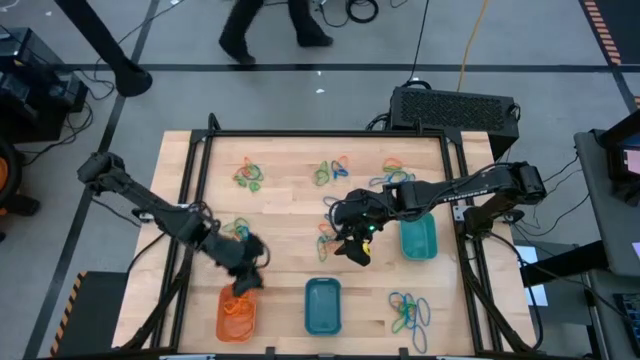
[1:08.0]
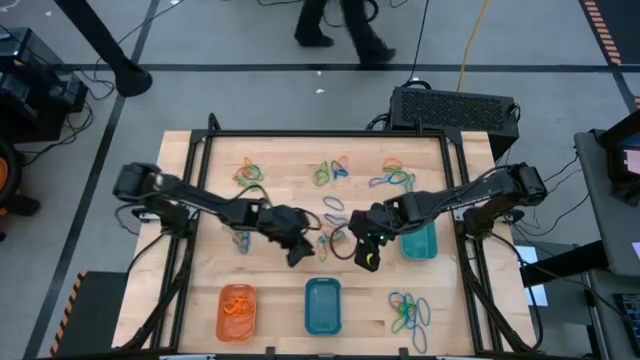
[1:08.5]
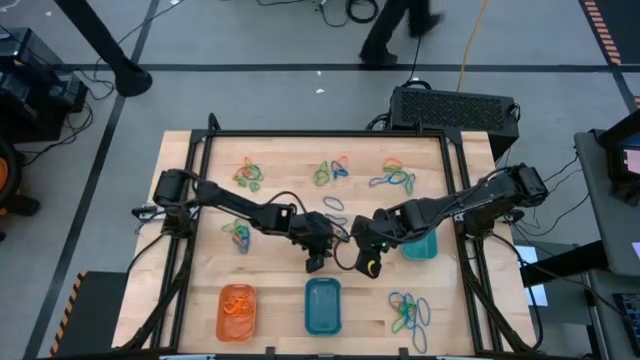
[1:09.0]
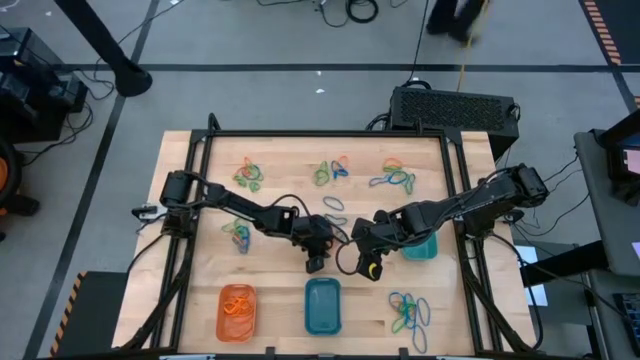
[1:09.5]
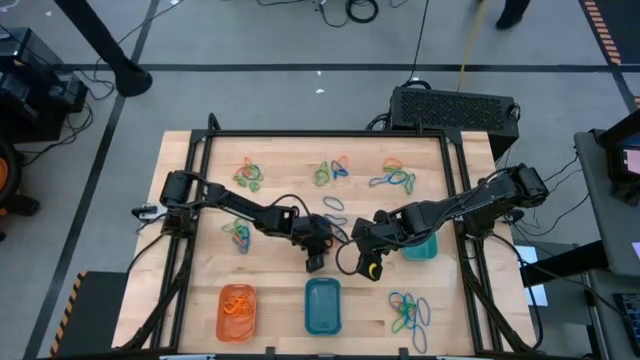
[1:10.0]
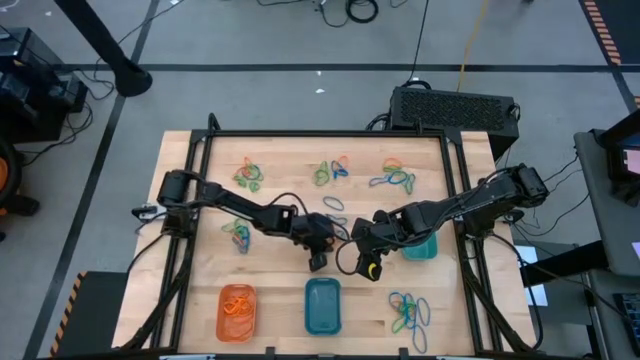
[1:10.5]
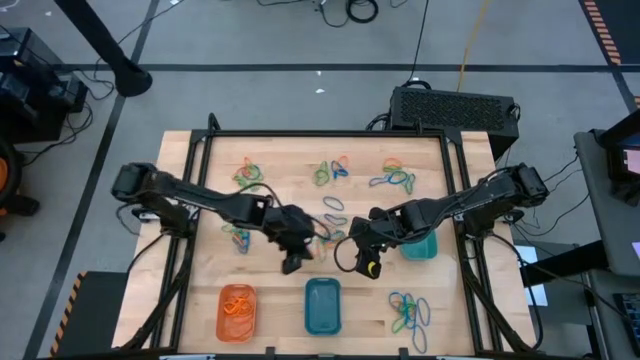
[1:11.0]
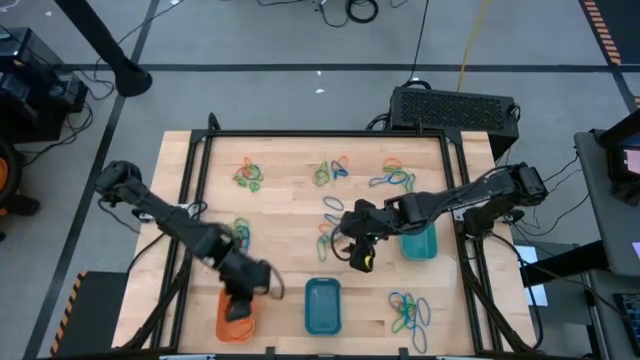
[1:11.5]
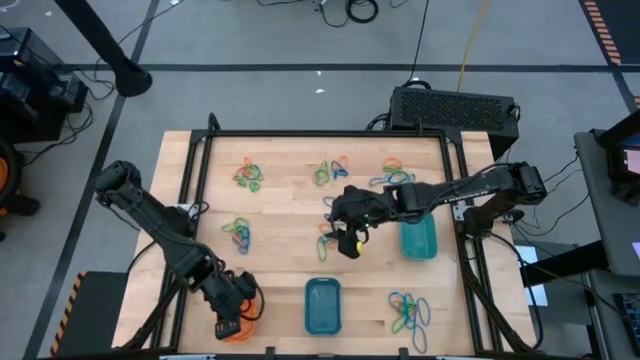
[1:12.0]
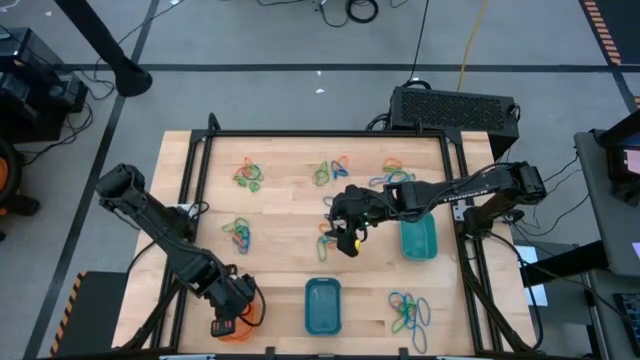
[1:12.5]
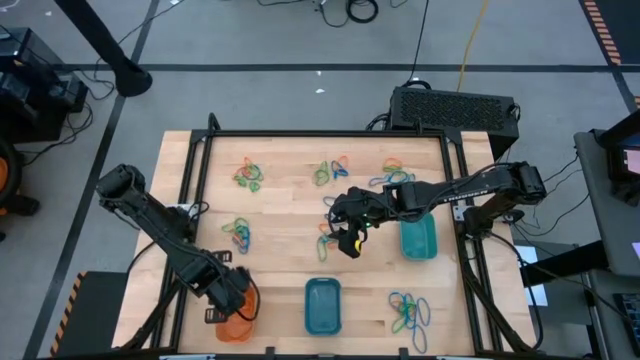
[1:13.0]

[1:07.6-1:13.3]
Task: Sort rubber bands into baskets
Put the orange rubber band into the orange bin

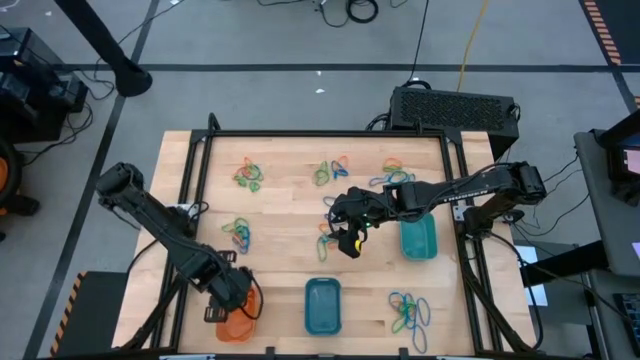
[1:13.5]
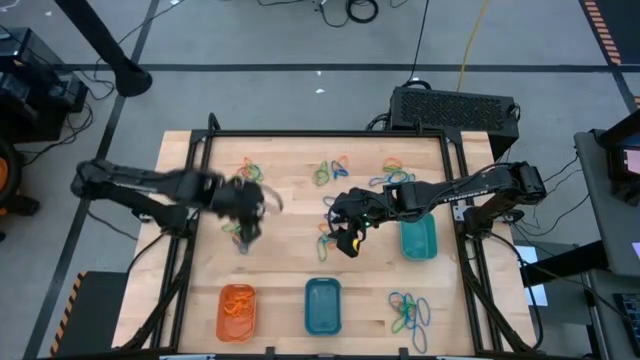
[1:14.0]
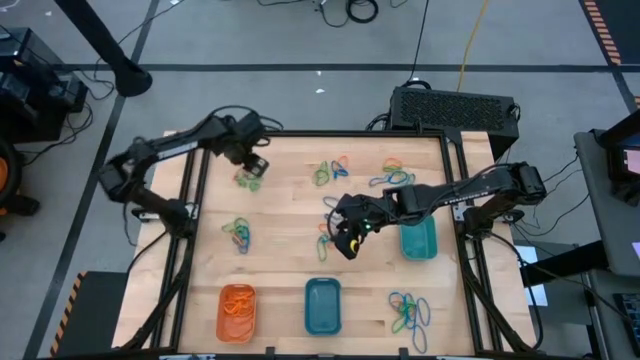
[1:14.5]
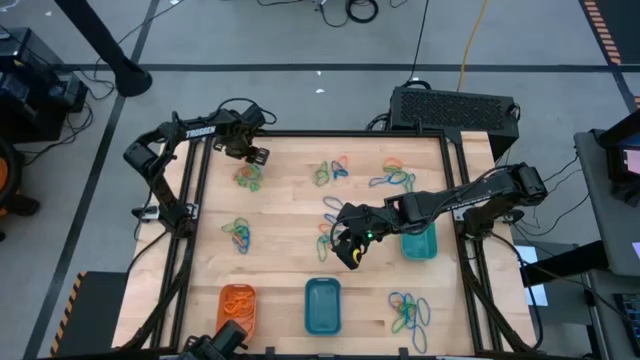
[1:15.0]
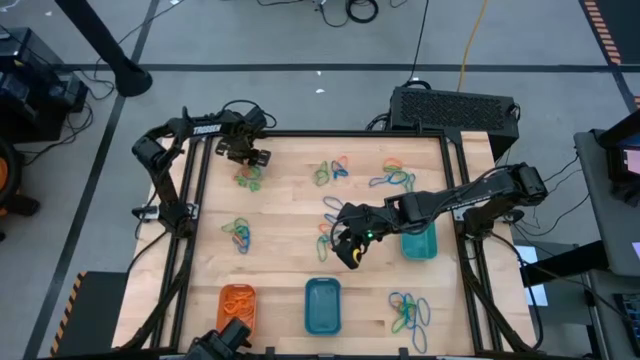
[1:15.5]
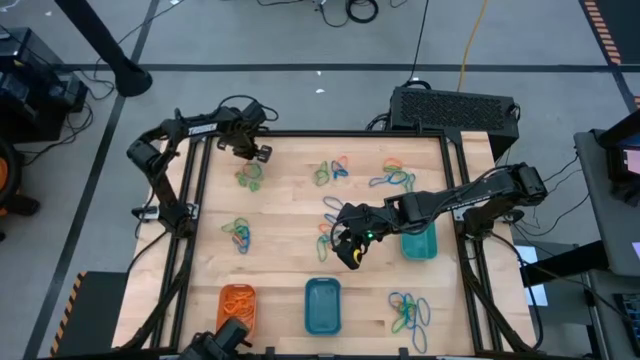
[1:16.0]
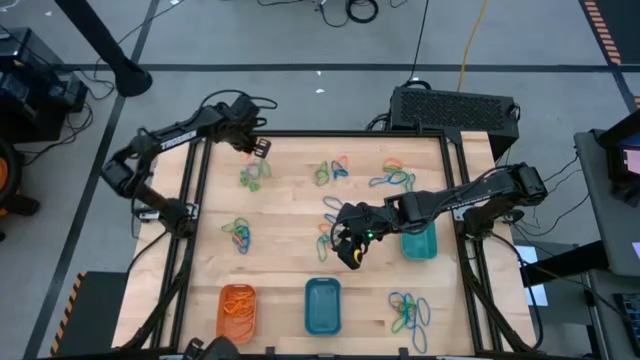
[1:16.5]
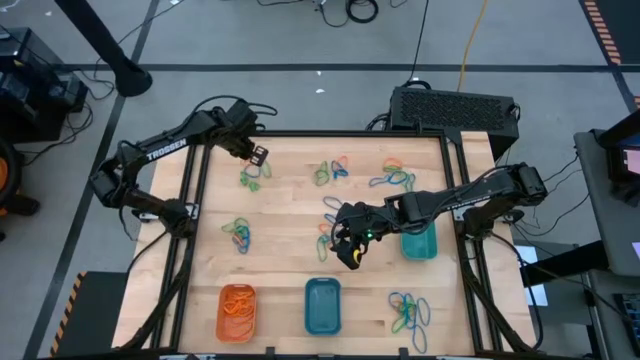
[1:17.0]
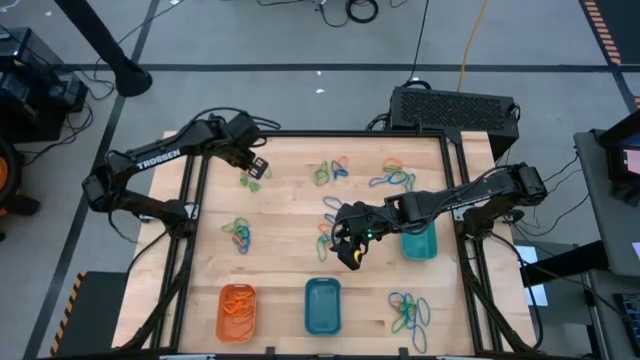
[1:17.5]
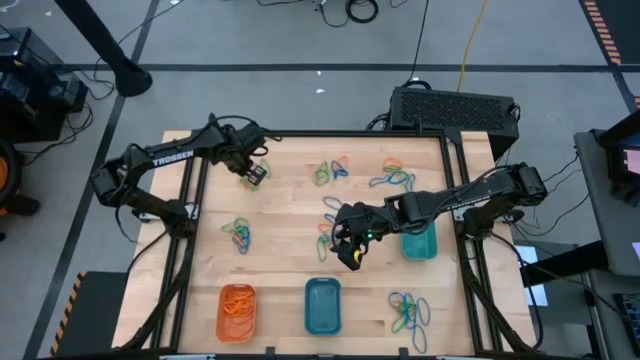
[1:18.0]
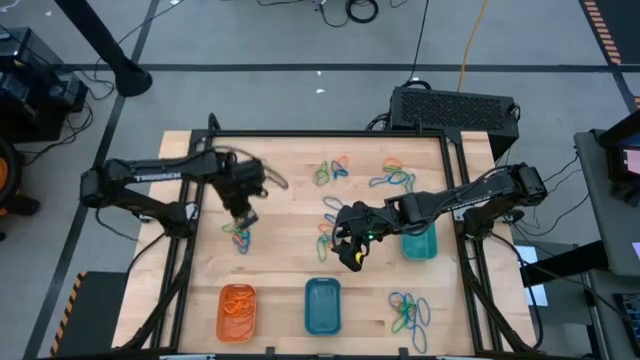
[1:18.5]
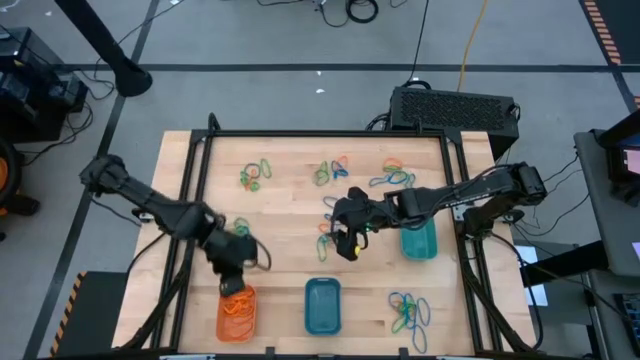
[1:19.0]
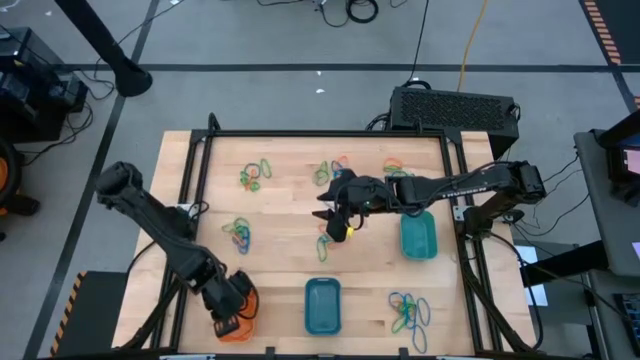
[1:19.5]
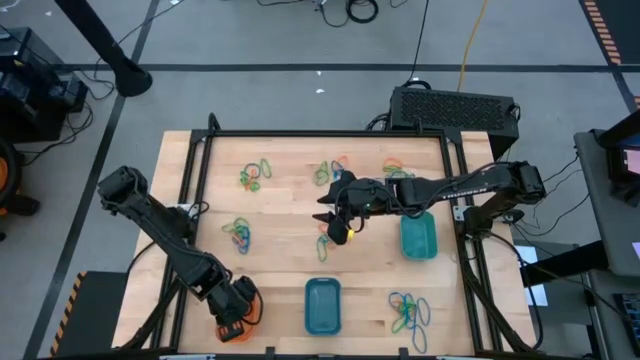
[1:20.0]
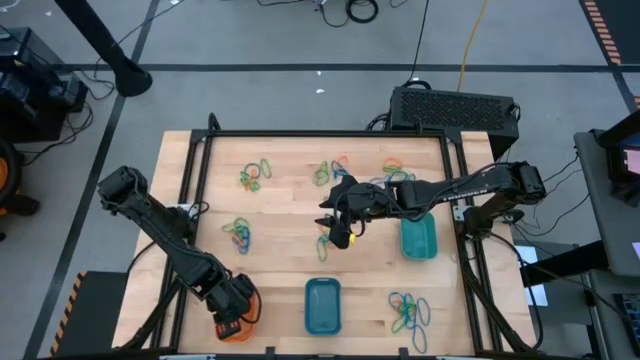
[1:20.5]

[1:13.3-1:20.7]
Put the orange rubber band into the orange bin

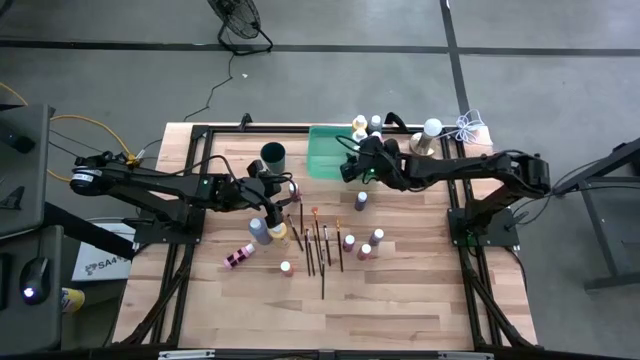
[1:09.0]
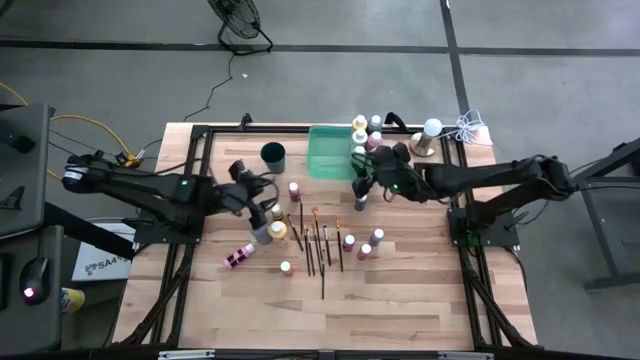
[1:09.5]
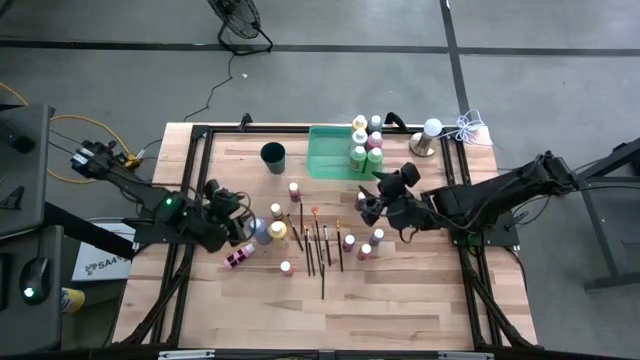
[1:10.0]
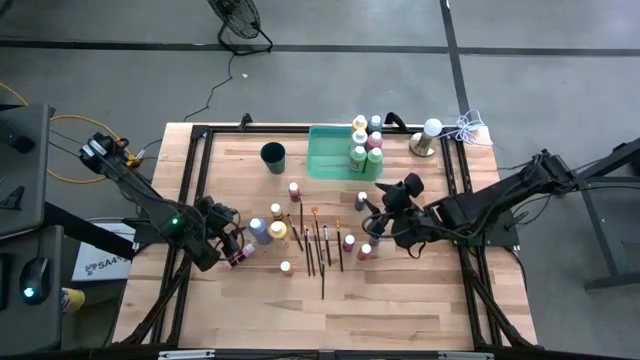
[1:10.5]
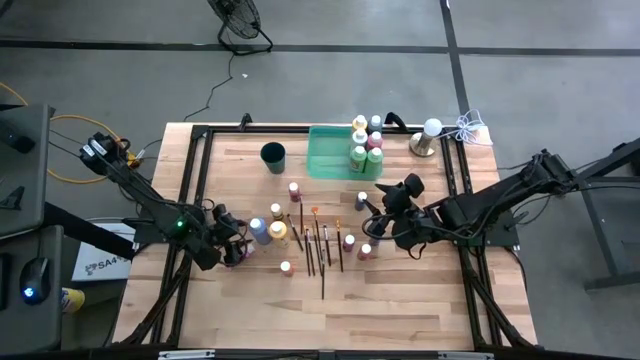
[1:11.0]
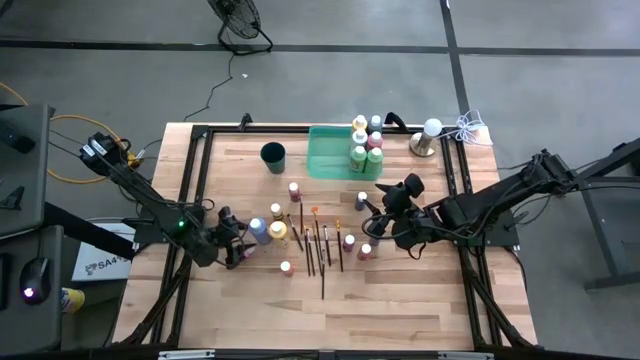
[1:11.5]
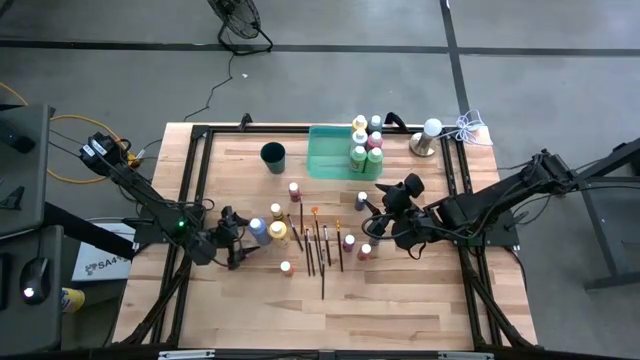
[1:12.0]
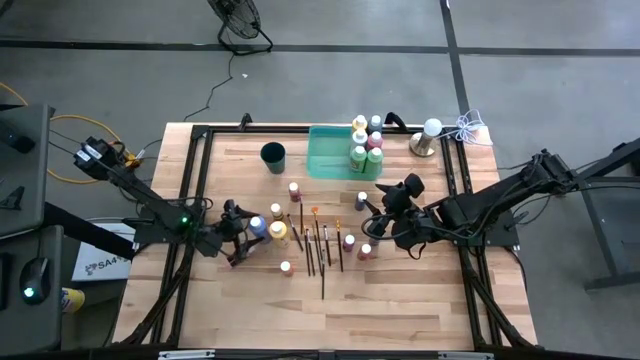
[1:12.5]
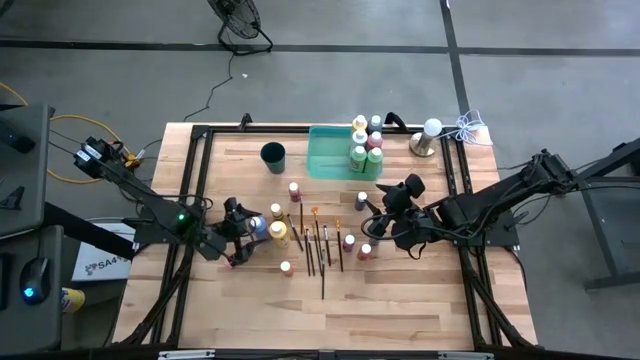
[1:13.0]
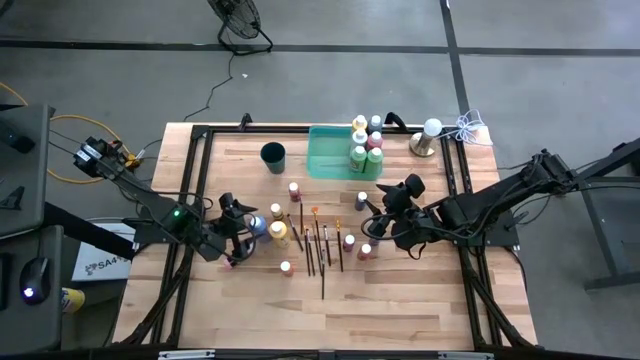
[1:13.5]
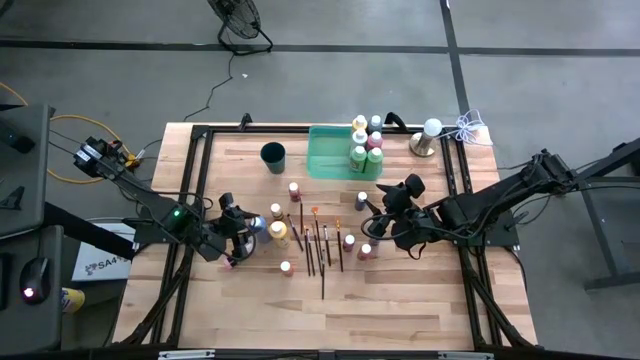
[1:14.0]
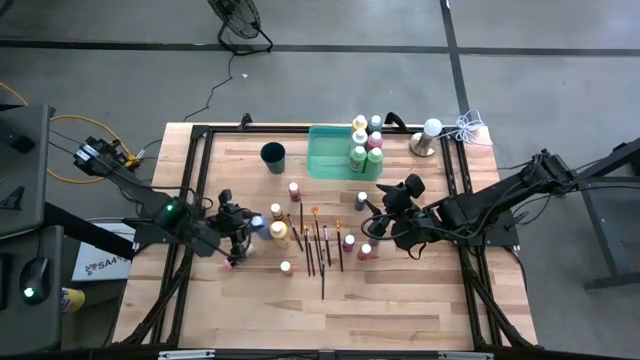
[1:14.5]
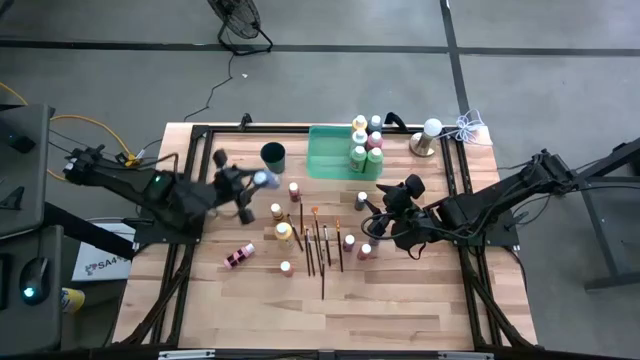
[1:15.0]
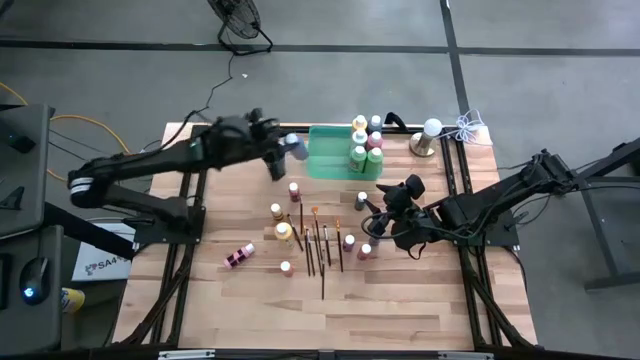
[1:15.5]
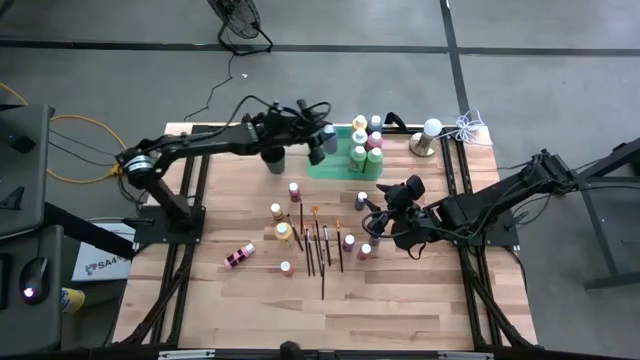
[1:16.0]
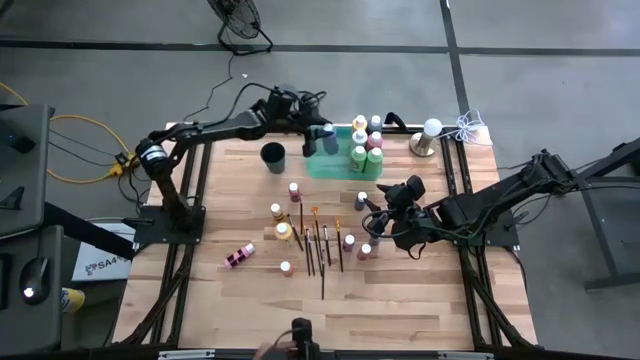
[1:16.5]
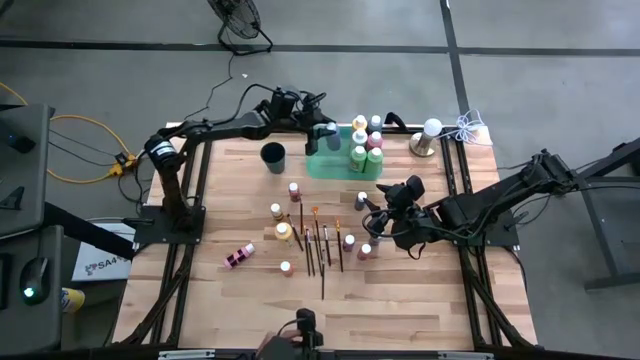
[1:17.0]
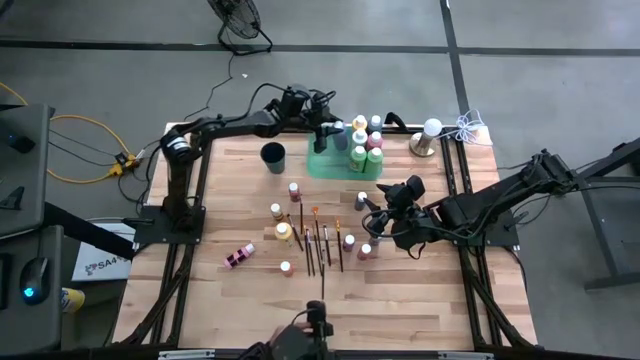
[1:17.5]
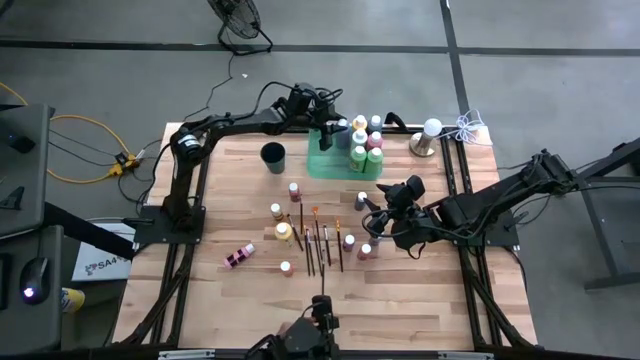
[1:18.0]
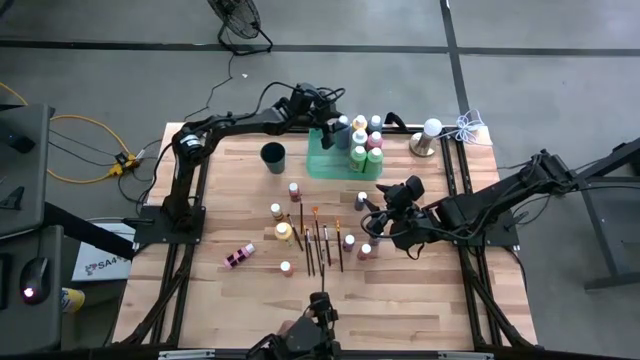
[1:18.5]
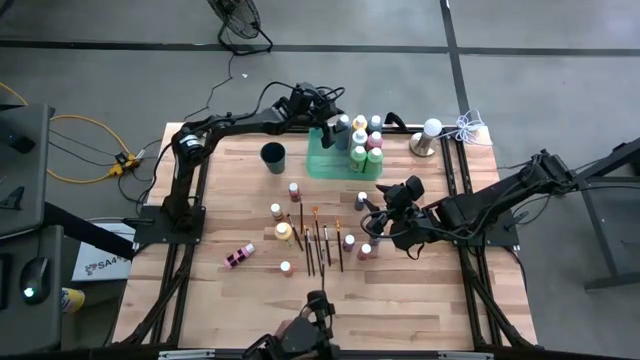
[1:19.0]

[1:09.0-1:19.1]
Task: Pick & Place Paint Supplies
Put the large blue paint bottle into the green bin
